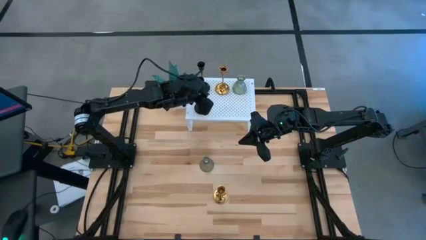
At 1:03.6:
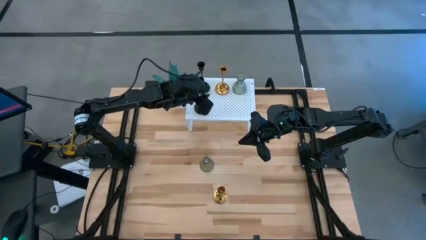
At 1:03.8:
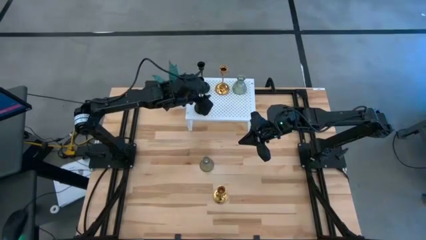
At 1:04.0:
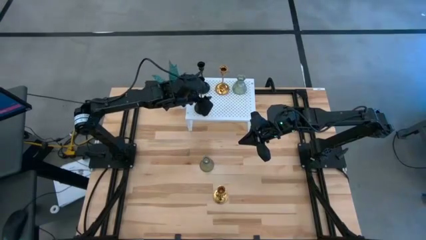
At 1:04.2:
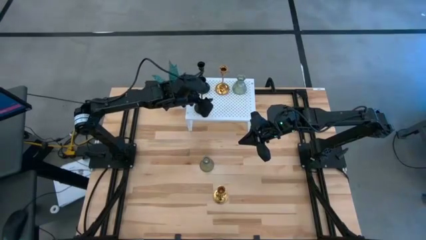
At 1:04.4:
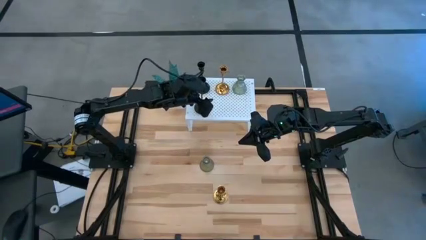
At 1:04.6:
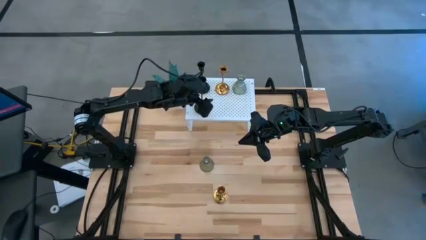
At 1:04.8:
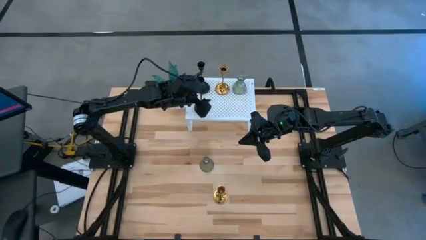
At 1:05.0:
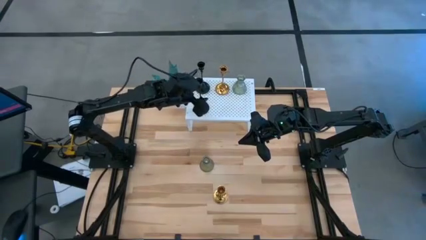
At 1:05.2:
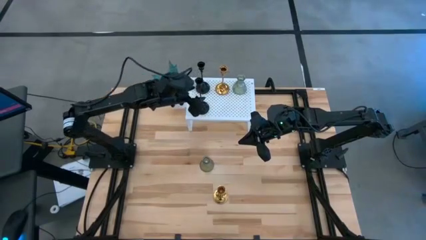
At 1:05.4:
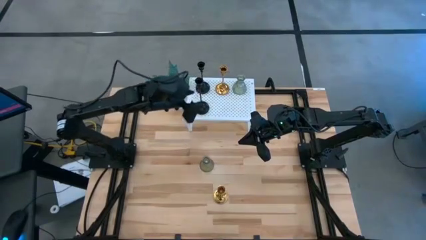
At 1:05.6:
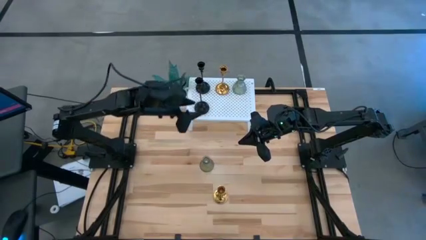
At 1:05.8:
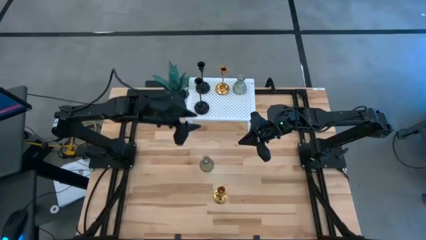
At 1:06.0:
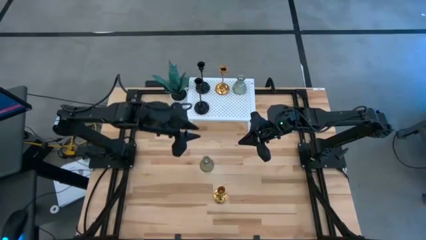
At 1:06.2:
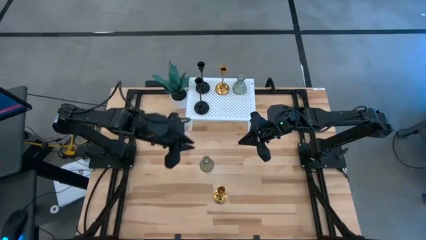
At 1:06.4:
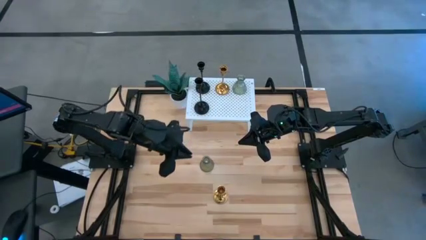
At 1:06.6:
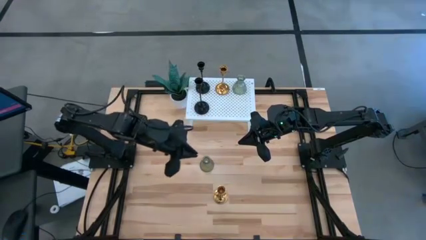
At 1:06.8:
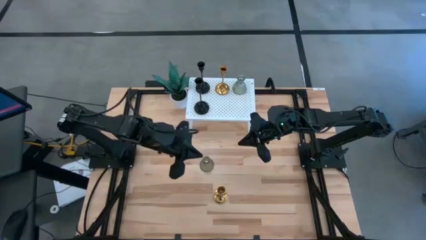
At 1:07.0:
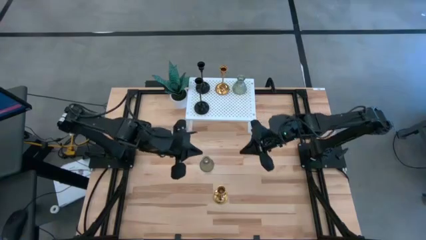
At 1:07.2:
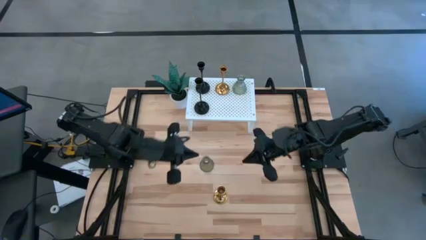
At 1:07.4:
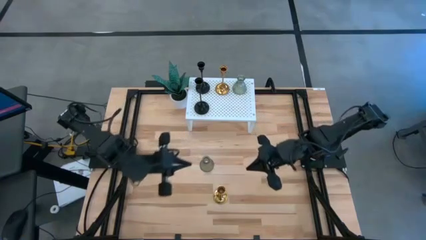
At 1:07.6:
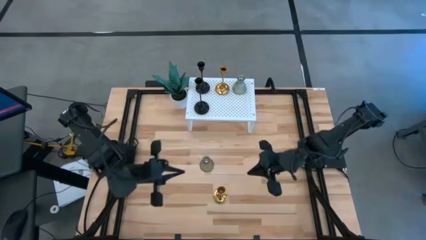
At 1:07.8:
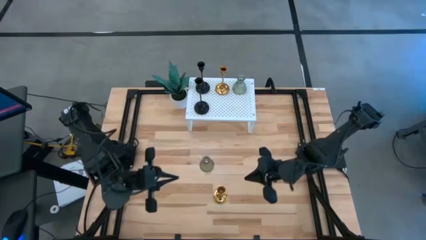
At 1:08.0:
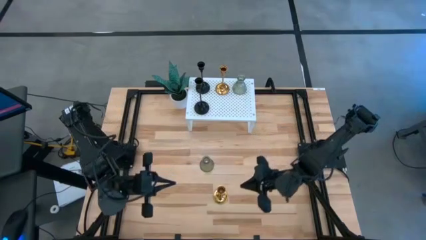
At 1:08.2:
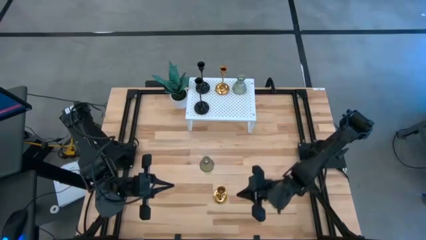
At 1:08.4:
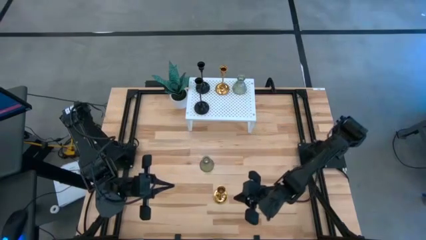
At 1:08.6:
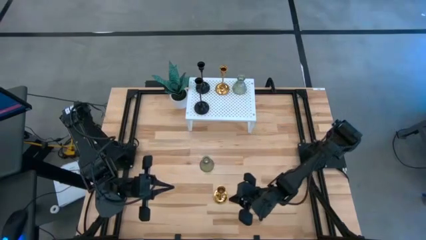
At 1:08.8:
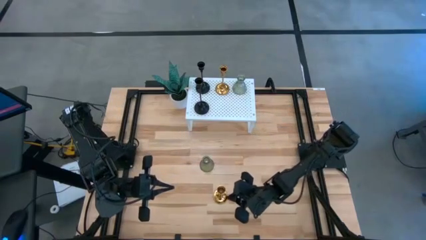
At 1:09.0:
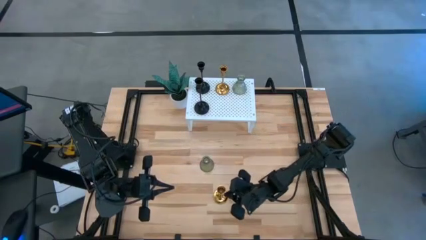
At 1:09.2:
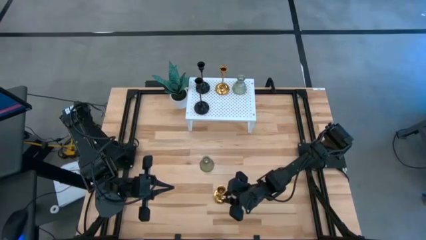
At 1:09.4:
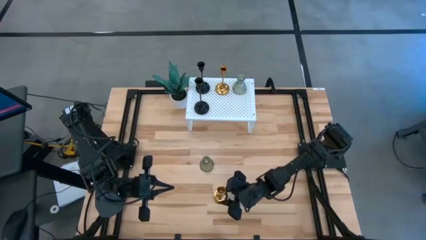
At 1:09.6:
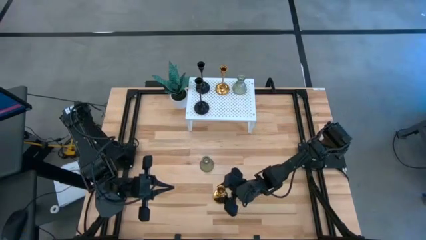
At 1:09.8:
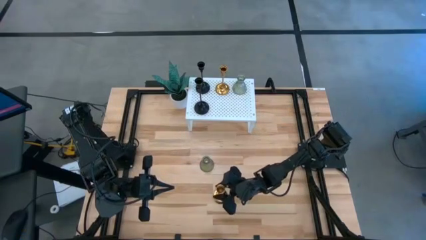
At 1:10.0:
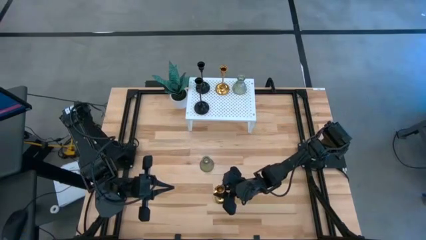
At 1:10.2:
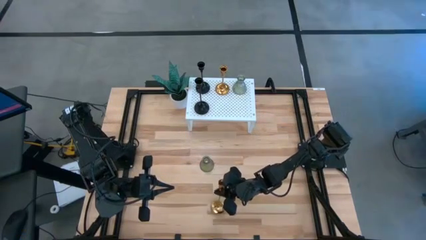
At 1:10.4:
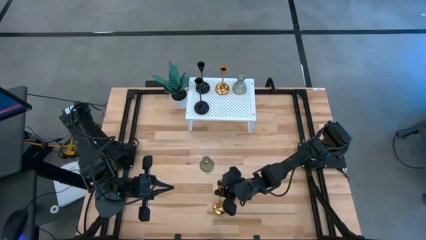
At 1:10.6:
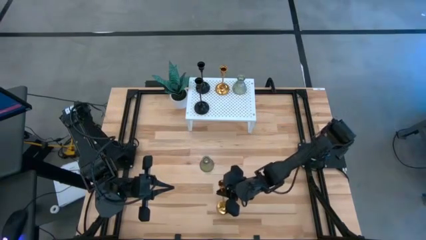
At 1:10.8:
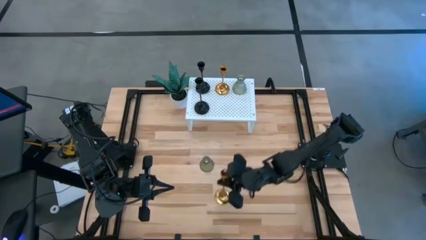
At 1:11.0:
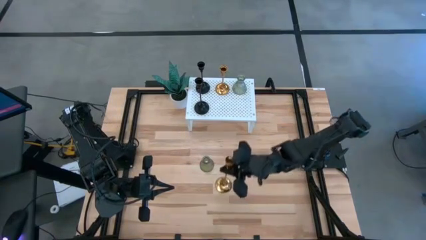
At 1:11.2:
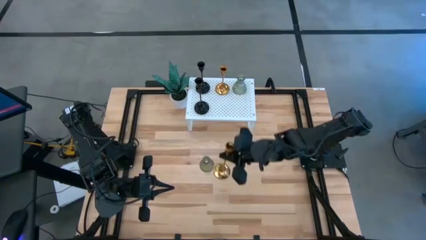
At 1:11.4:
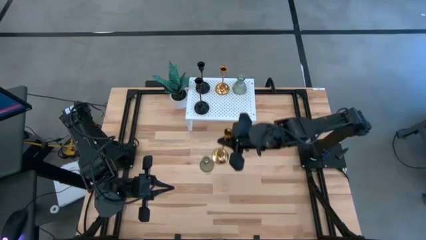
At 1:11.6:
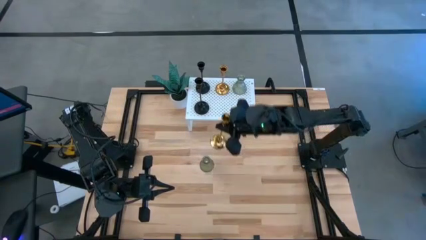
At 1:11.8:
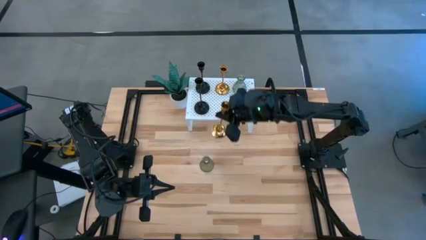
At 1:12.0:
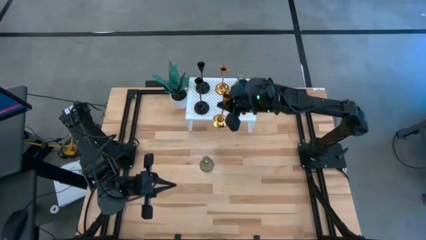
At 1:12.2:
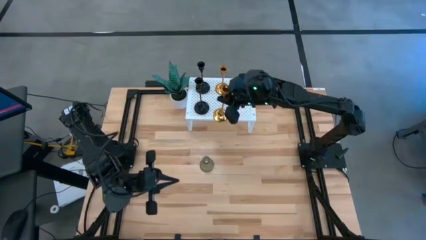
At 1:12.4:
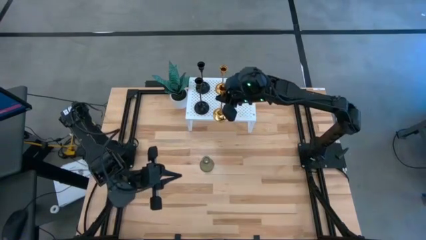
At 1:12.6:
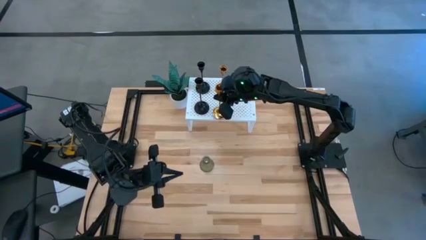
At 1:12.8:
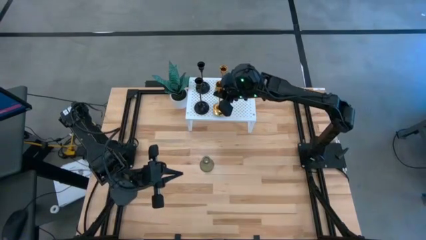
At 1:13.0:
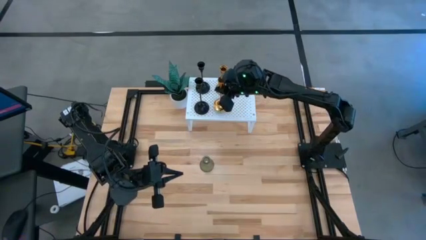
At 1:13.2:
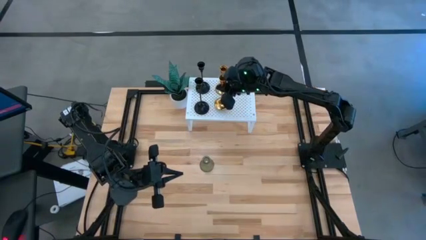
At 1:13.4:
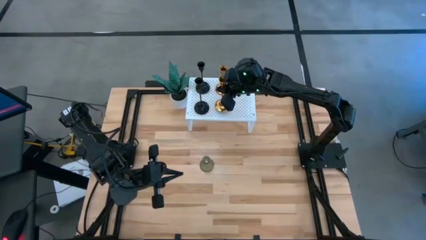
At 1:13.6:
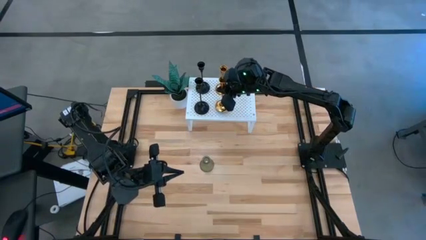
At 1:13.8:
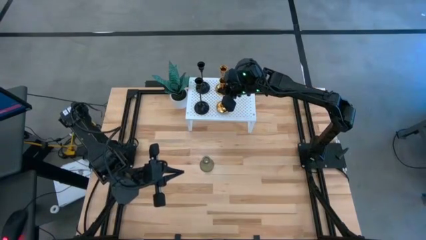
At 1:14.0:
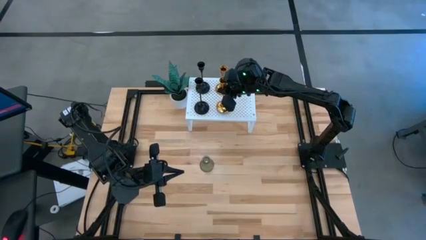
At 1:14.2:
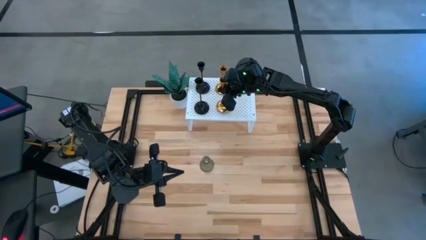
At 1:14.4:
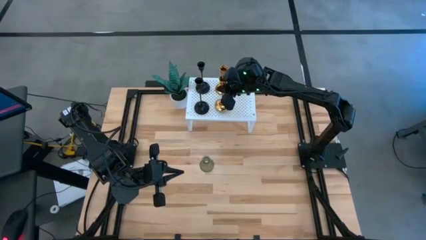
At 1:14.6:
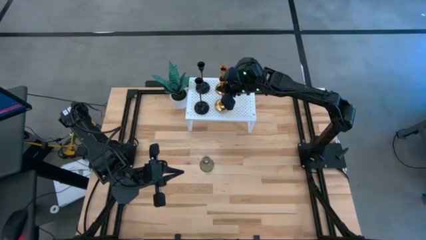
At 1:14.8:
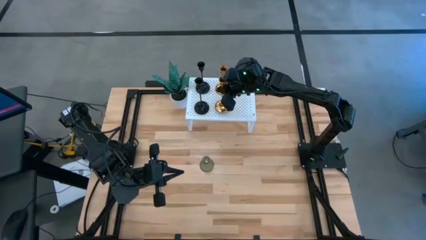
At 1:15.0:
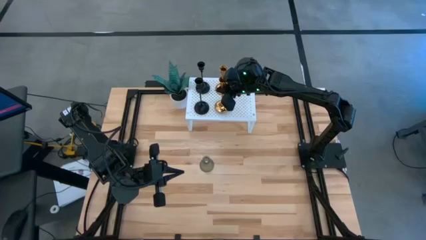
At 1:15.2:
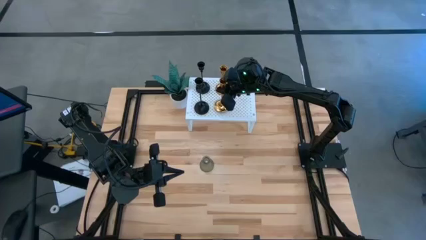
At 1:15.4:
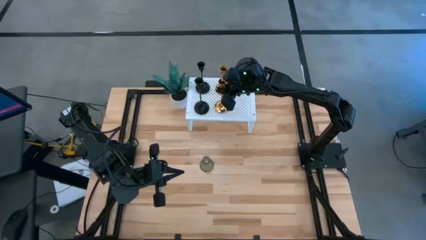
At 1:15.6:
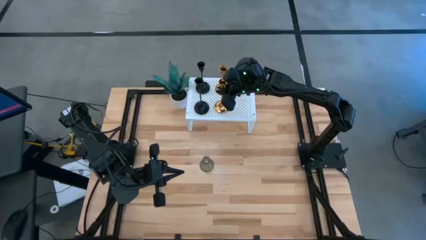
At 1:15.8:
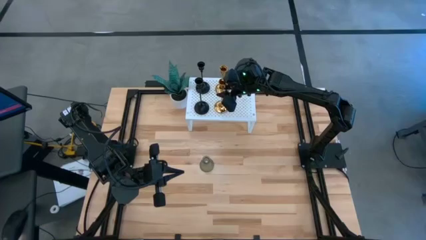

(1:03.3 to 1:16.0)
Task: Pick & Place candle stick holders
Align the gold candle holder on the shelf with the other gold candle holder
